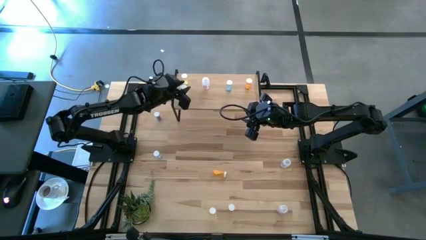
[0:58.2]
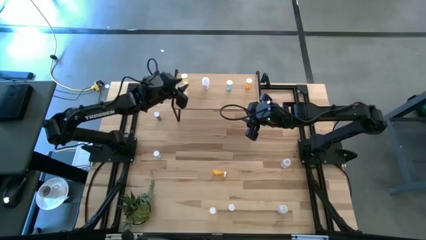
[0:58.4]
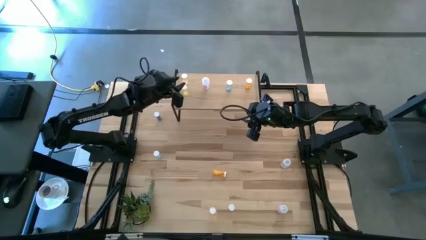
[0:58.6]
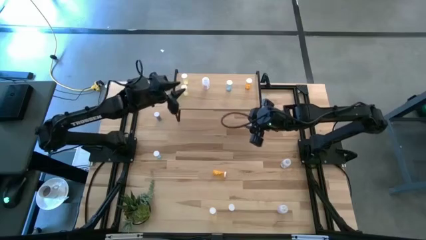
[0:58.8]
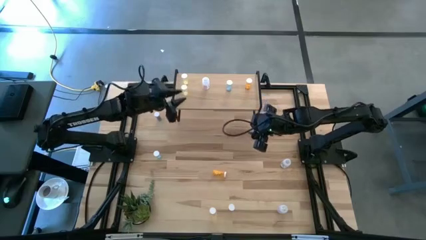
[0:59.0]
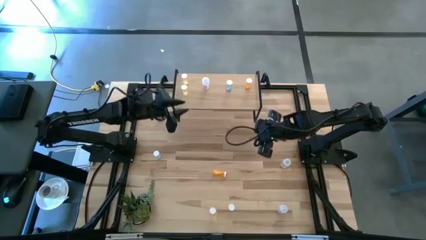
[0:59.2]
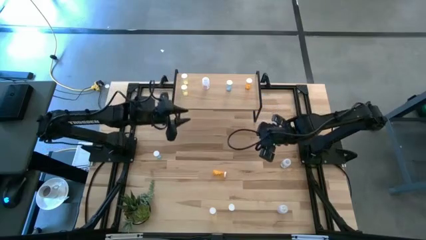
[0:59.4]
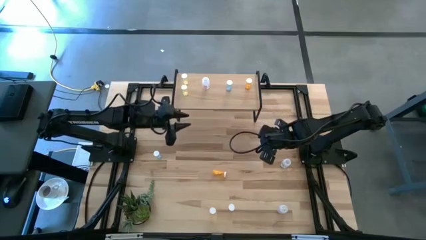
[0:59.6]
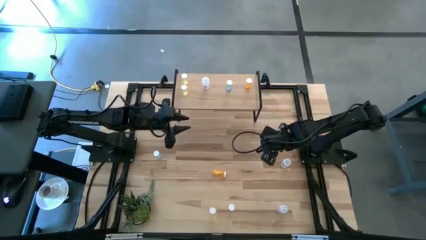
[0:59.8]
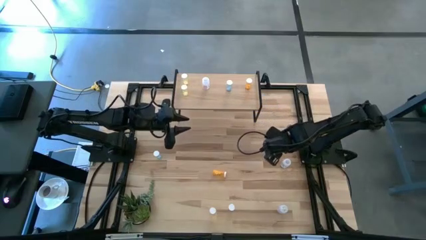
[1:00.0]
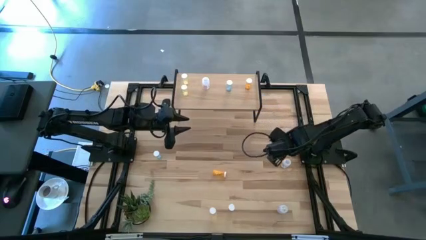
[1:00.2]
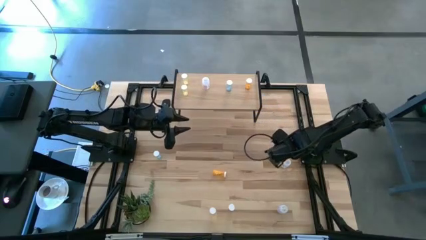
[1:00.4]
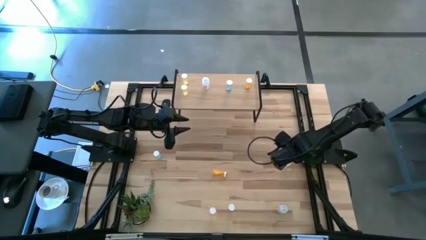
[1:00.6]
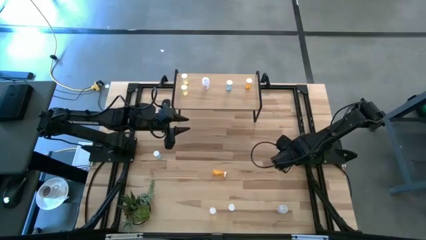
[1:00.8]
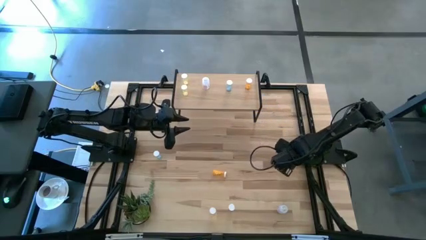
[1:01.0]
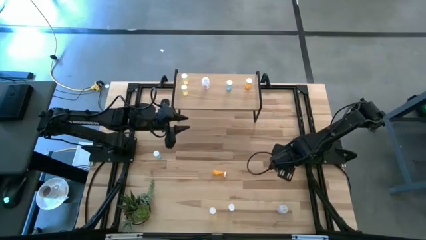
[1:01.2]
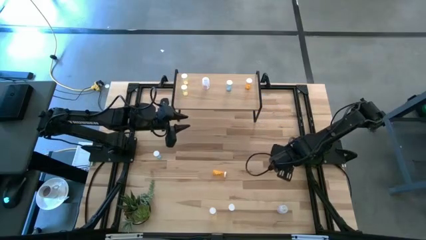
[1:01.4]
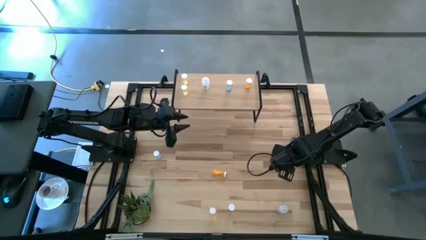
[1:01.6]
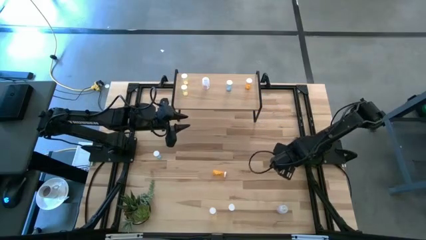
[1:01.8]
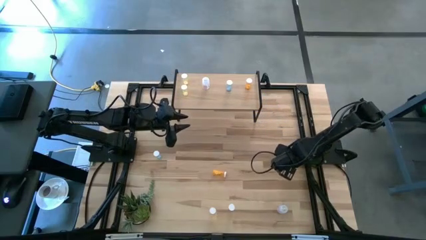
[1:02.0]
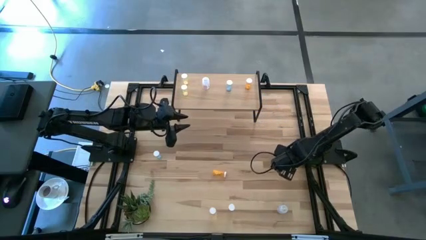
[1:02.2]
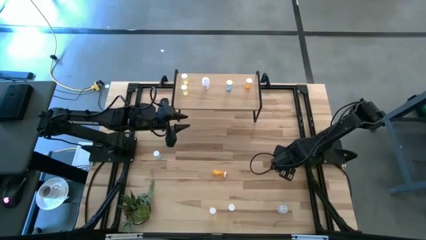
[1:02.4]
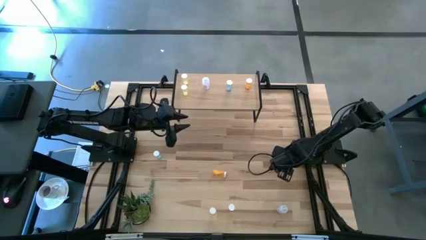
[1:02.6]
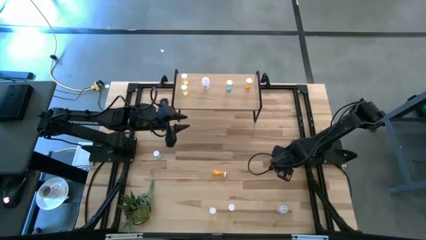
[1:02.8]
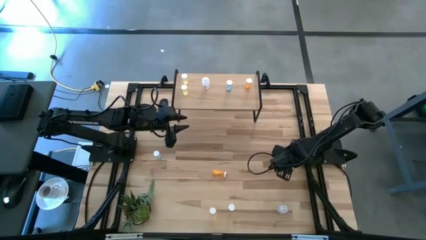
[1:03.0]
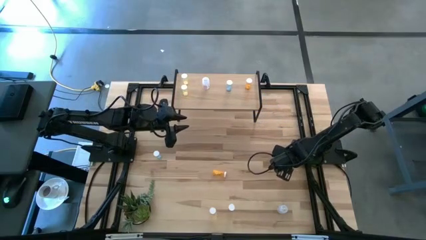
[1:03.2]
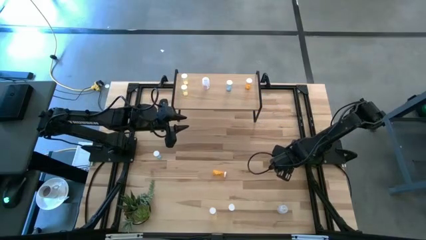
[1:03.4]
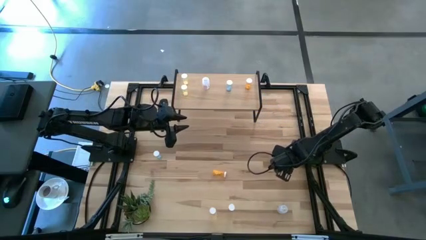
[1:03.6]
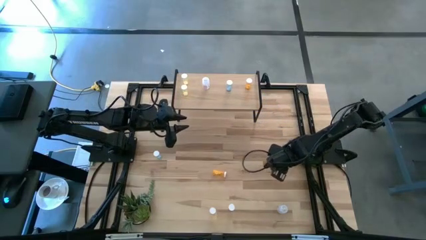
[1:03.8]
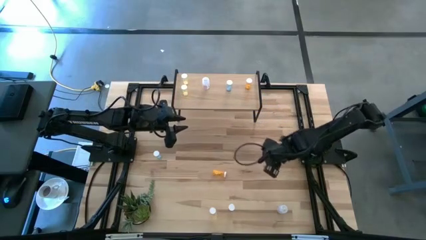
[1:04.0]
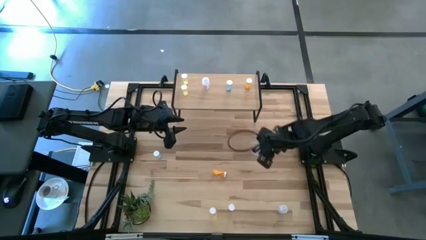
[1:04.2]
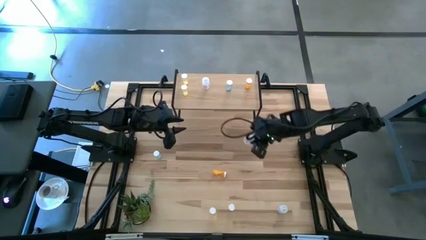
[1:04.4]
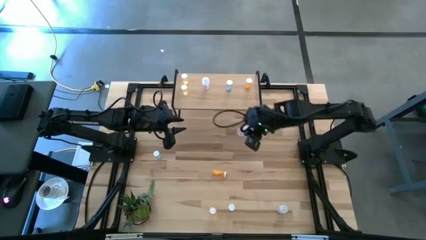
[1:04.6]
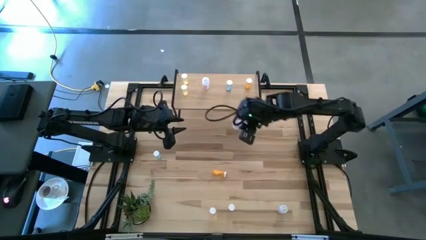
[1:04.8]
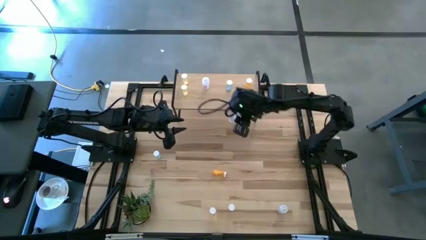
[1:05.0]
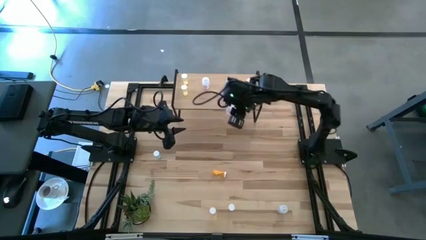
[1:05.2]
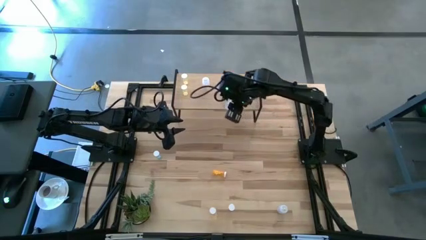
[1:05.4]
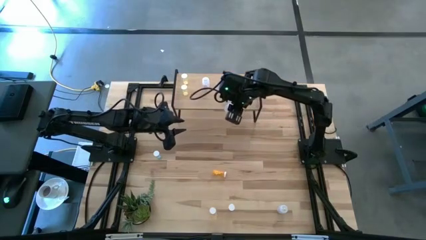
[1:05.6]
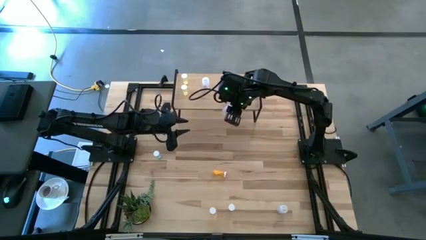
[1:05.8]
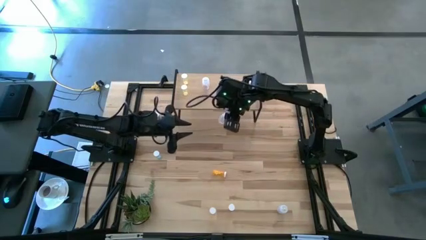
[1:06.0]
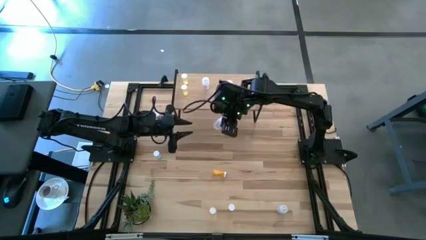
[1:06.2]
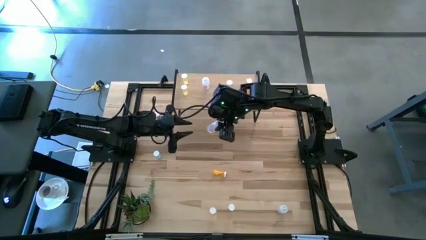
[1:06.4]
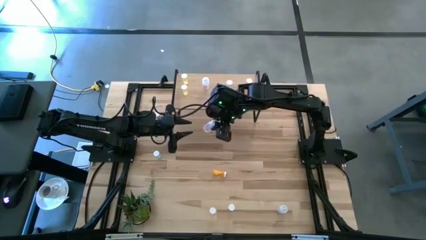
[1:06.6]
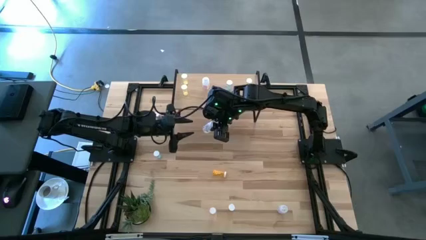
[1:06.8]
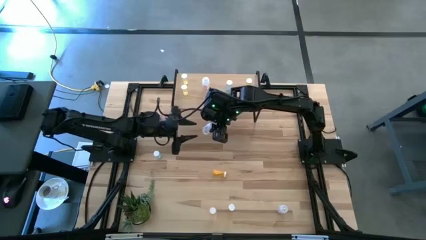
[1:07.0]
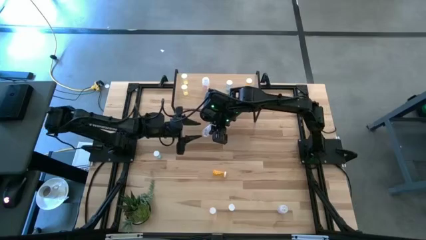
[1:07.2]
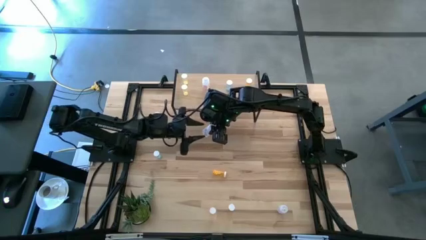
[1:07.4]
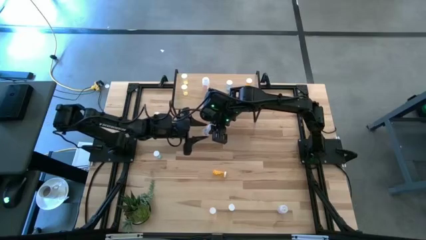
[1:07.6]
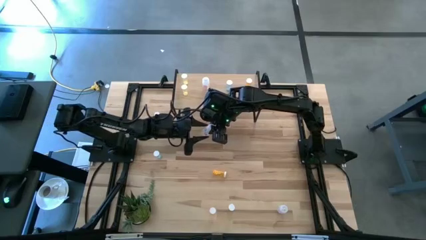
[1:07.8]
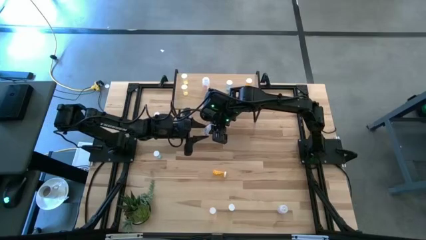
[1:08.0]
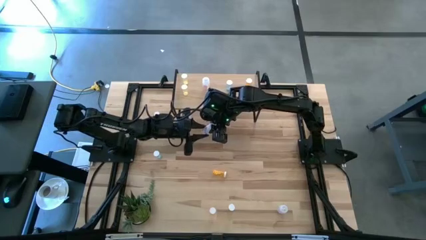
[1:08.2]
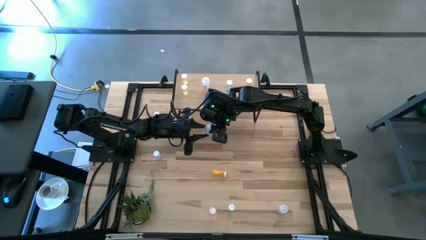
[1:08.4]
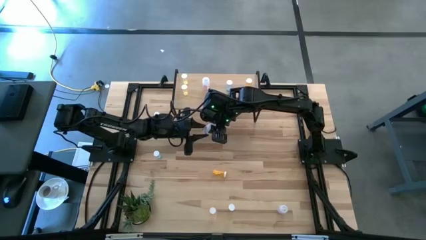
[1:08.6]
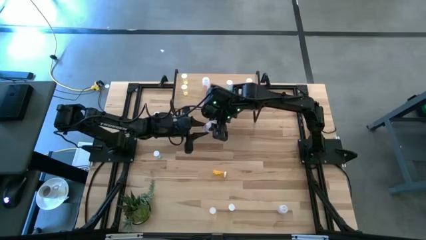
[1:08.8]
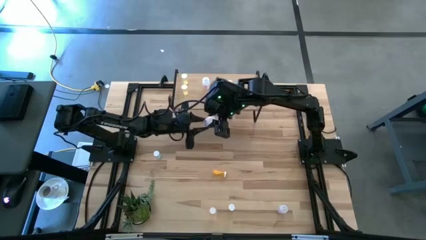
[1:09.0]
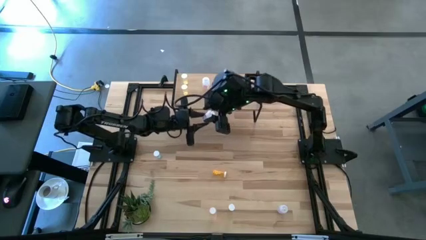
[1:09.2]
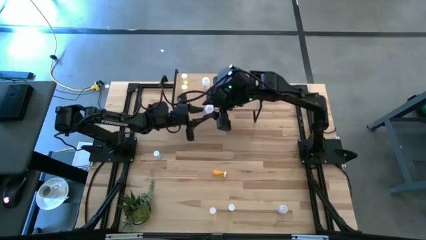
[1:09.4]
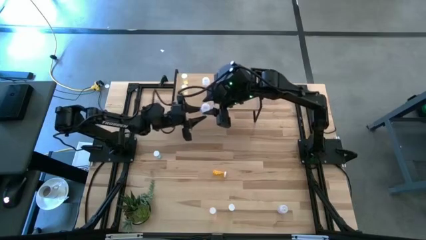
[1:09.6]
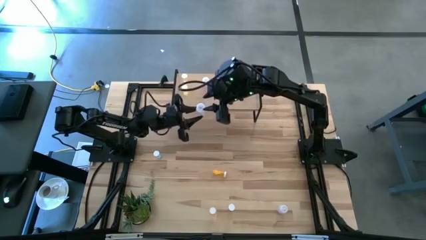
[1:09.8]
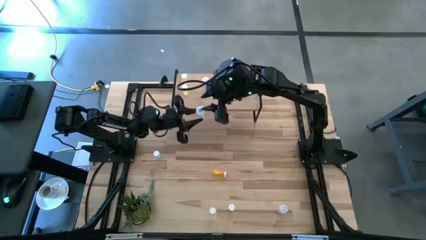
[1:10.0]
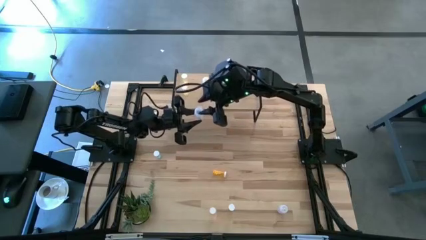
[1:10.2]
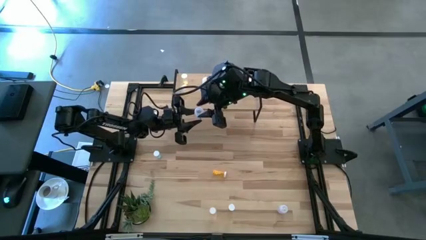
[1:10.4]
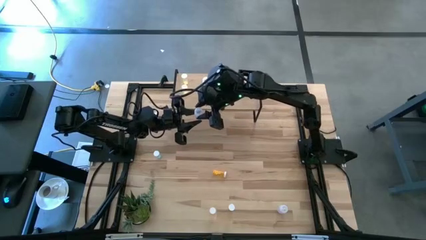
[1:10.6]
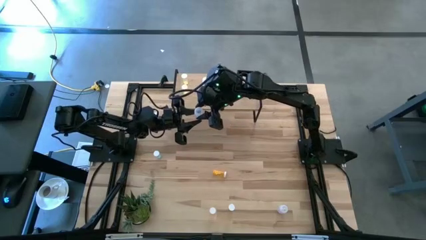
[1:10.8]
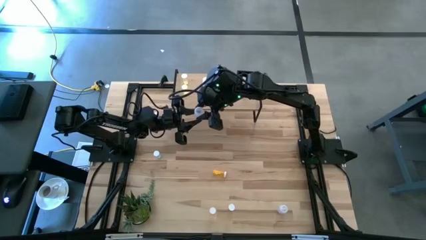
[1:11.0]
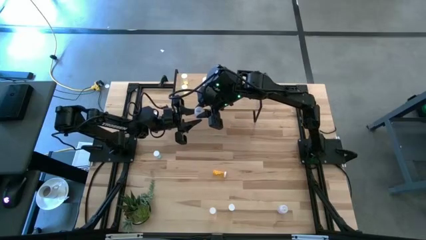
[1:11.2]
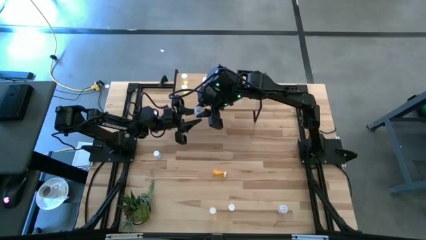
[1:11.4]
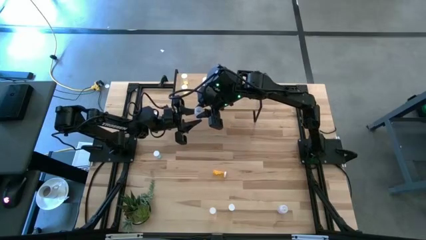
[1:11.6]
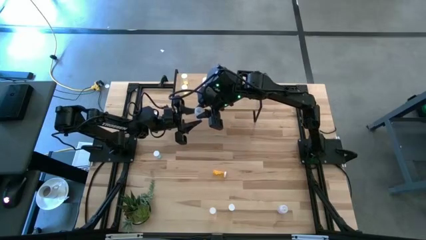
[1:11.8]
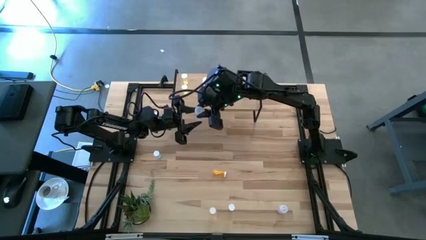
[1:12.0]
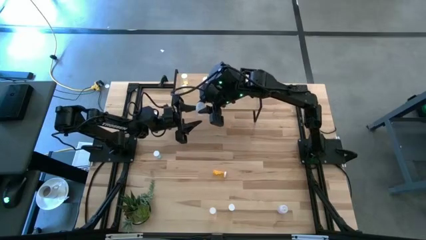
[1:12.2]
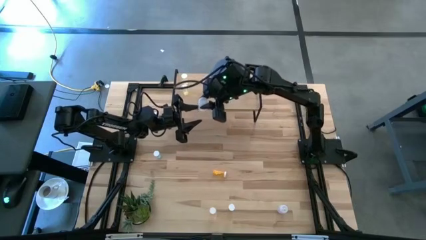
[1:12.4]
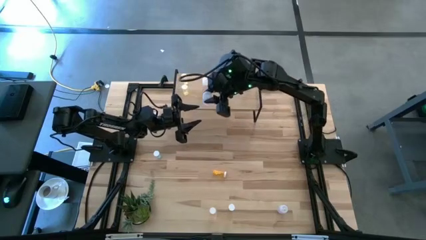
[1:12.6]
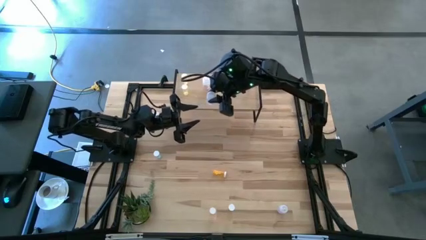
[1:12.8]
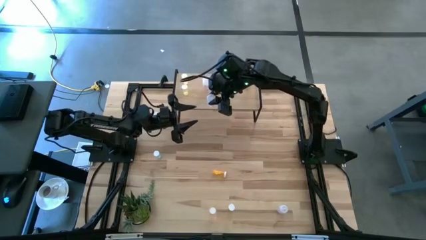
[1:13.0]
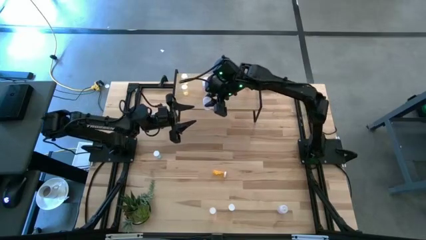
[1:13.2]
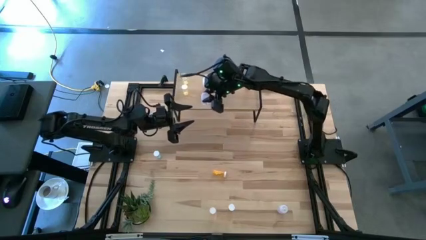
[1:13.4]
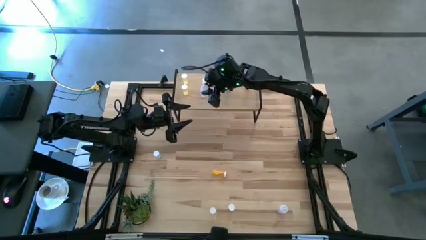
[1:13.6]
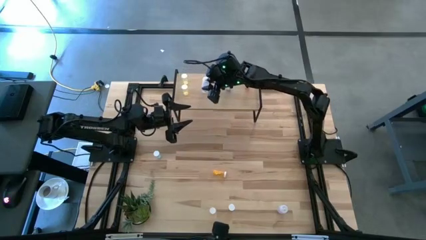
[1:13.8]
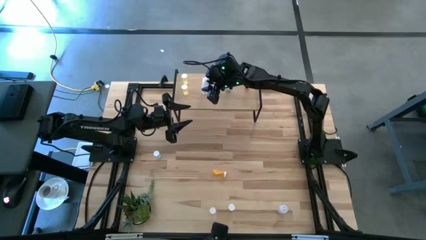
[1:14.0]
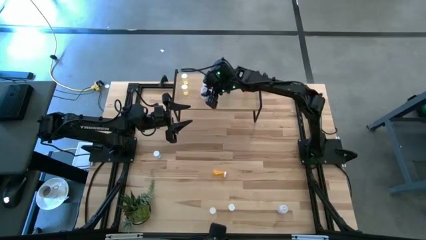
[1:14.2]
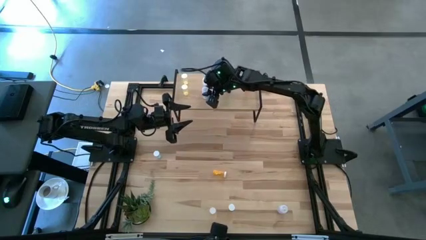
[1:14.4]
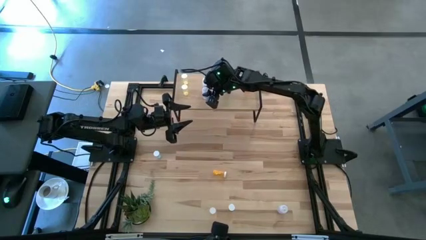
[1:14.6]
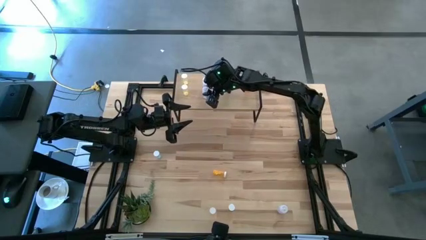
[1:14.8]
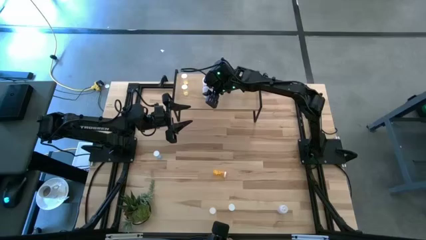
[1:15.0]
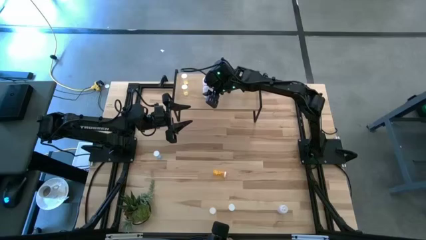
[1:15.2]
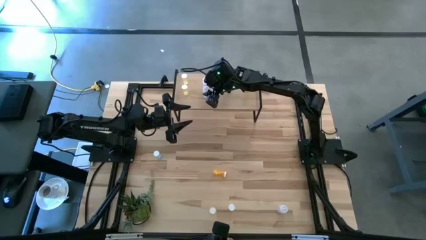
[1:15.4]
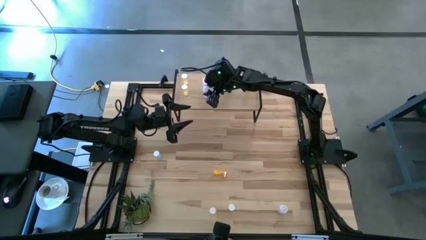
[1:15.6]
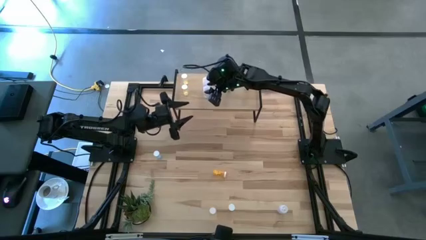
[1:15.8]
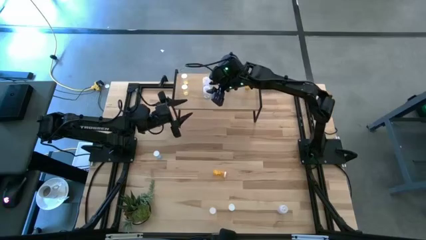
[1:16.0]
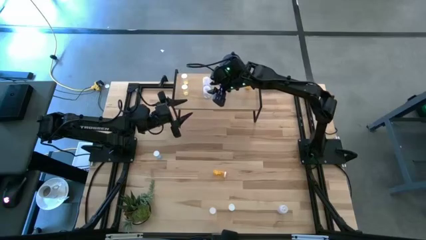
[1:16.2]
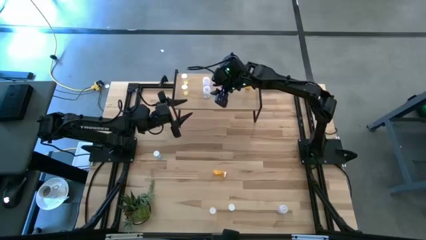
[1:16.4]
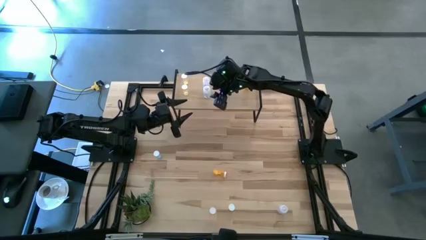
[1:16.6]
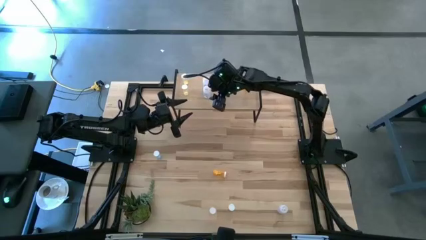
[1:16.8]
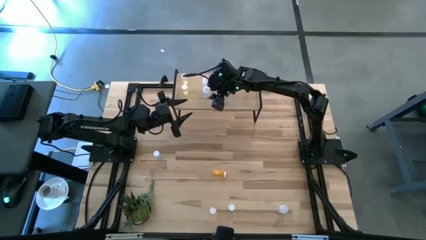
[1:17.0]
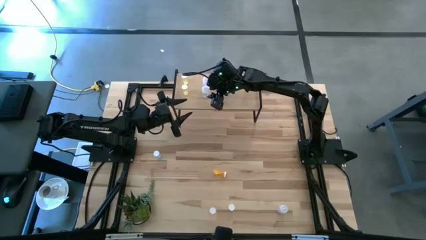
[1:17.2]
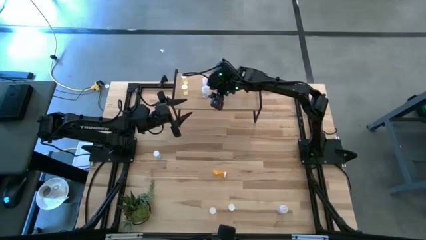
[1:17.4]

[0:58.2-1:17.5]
Task: Pick and place medicine bottles onto shelf by color
Put the top transparent pill bottle on the shelf aligned with the transparent pill bottle
